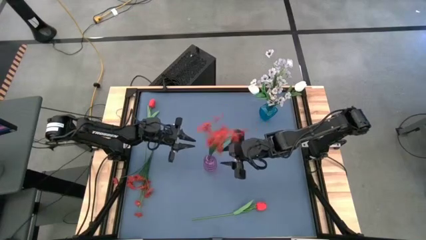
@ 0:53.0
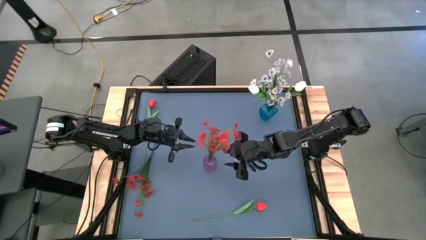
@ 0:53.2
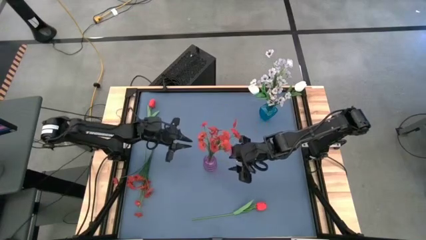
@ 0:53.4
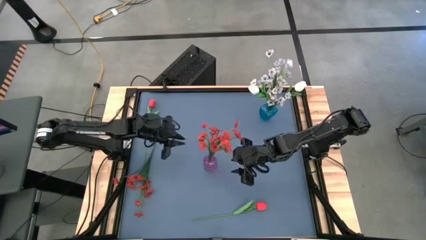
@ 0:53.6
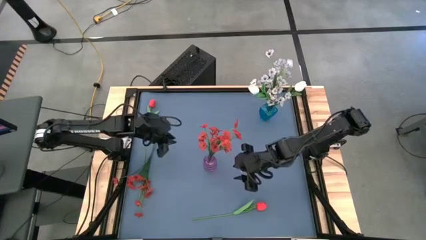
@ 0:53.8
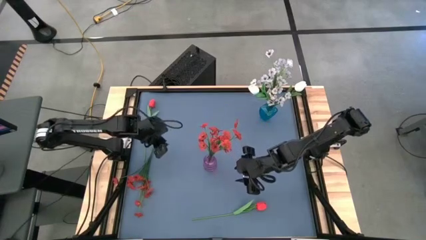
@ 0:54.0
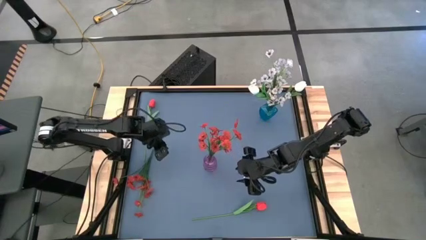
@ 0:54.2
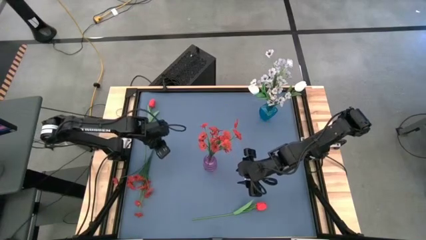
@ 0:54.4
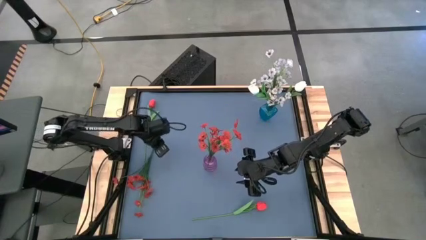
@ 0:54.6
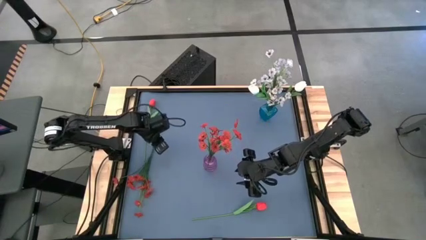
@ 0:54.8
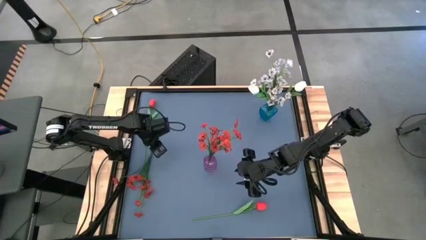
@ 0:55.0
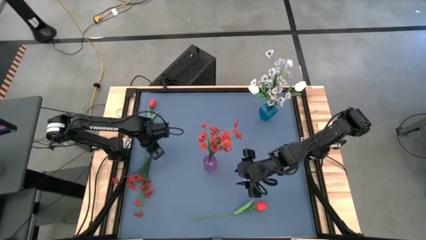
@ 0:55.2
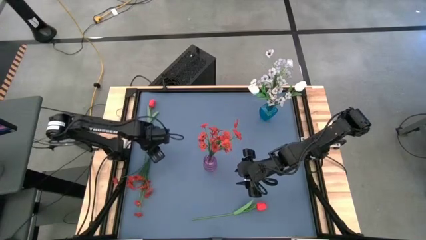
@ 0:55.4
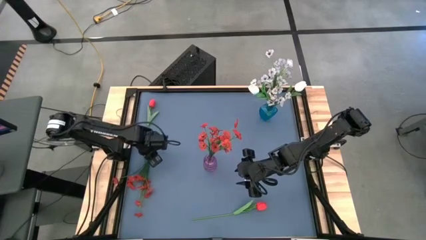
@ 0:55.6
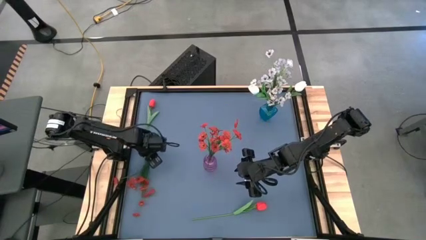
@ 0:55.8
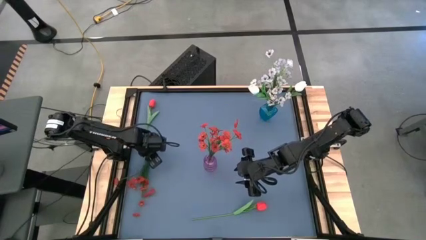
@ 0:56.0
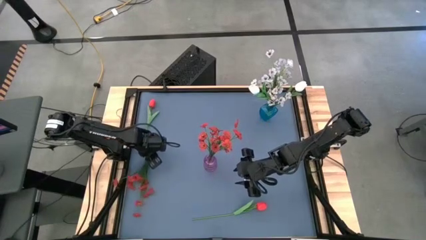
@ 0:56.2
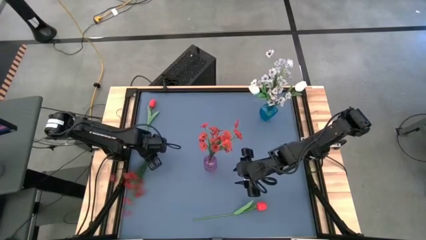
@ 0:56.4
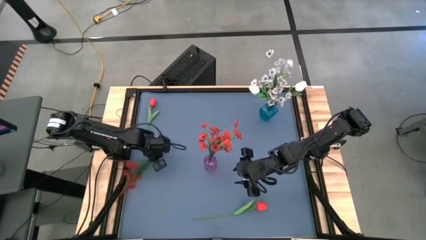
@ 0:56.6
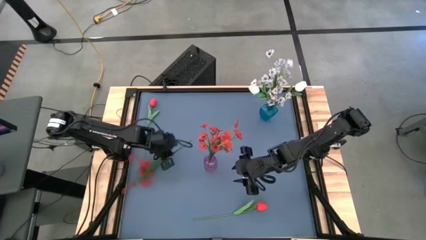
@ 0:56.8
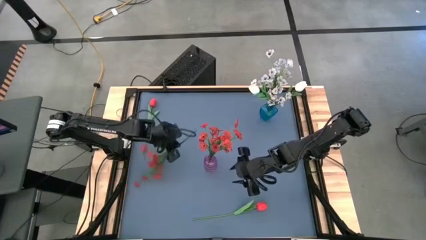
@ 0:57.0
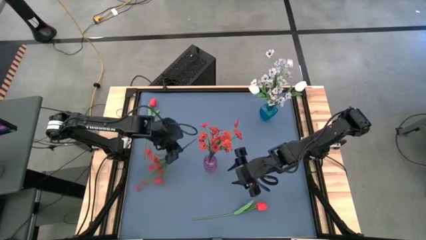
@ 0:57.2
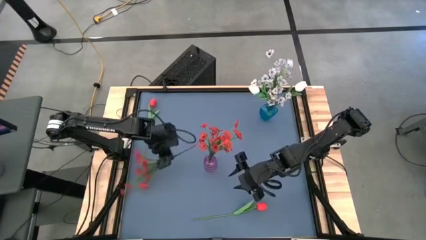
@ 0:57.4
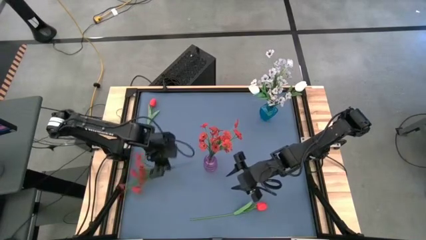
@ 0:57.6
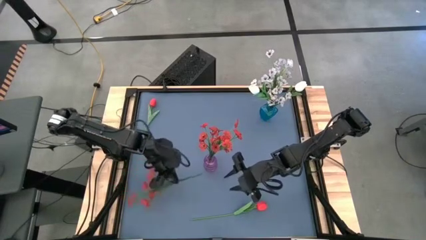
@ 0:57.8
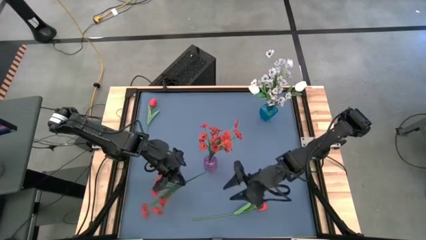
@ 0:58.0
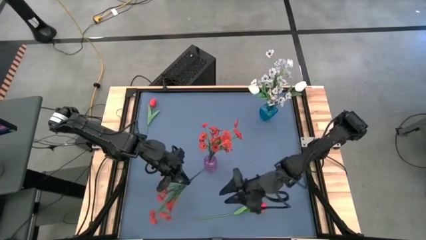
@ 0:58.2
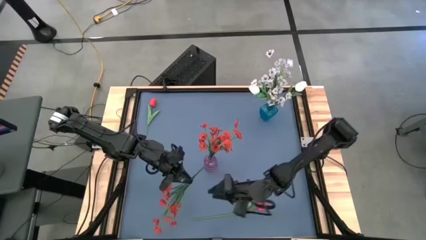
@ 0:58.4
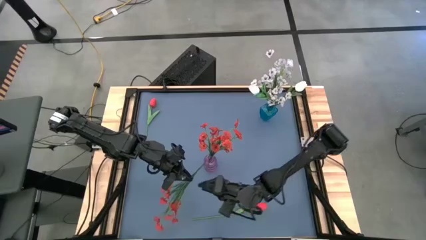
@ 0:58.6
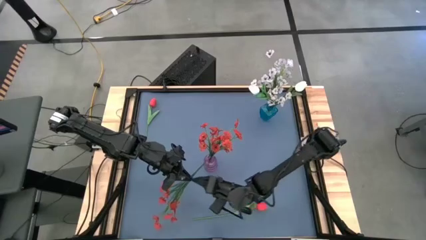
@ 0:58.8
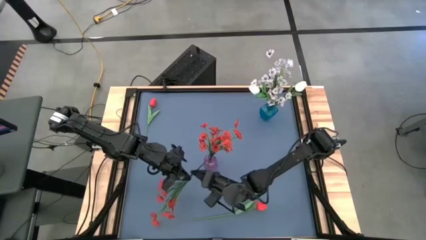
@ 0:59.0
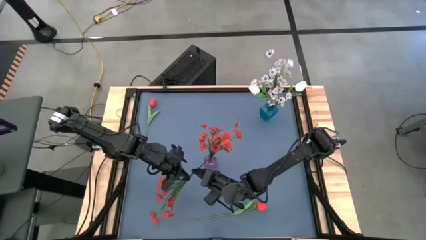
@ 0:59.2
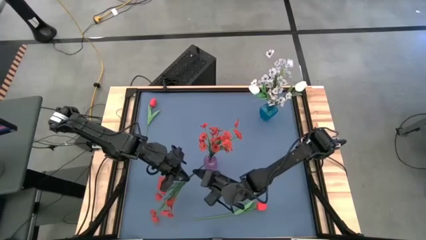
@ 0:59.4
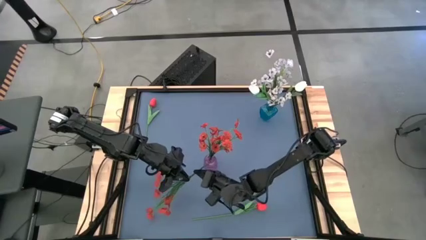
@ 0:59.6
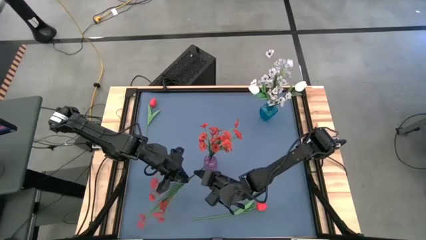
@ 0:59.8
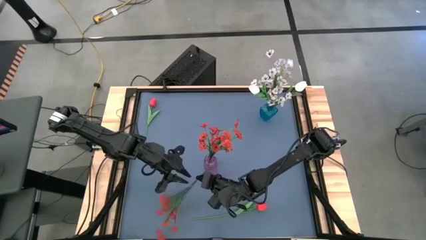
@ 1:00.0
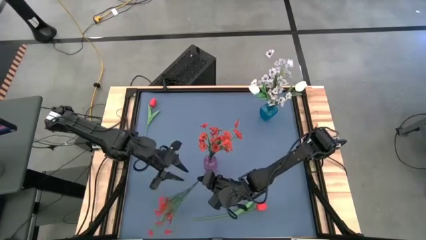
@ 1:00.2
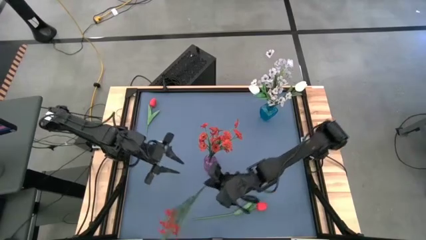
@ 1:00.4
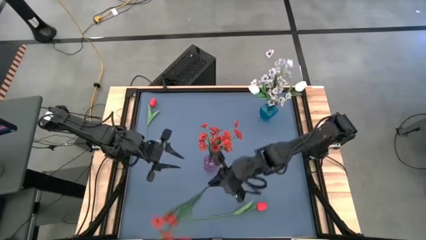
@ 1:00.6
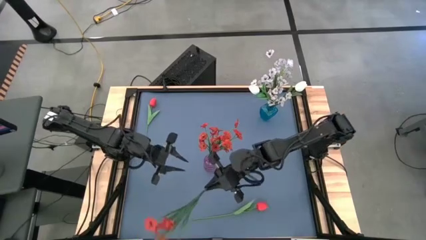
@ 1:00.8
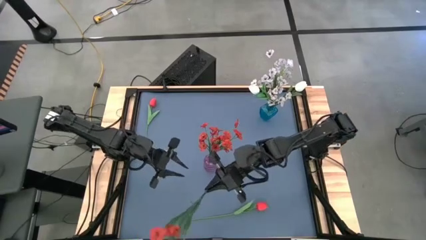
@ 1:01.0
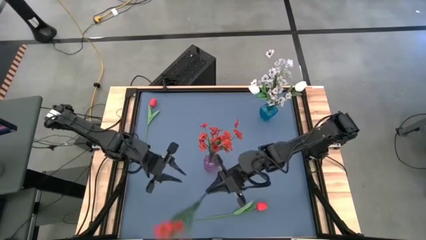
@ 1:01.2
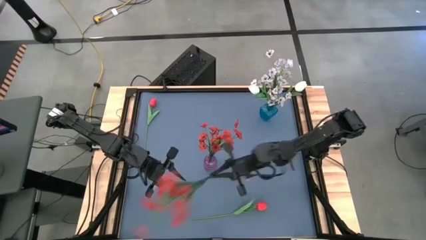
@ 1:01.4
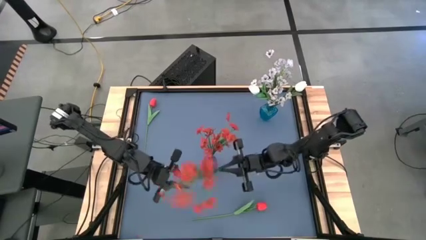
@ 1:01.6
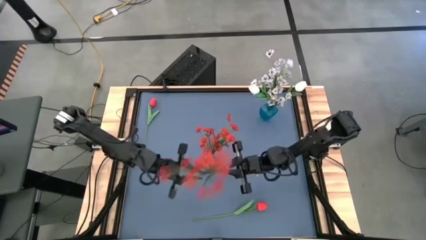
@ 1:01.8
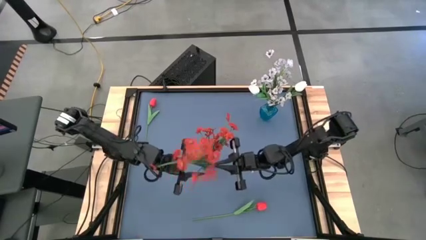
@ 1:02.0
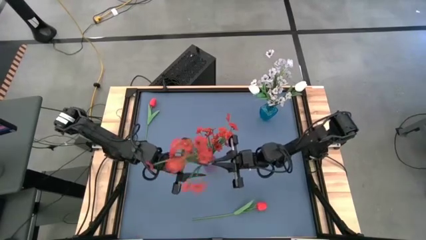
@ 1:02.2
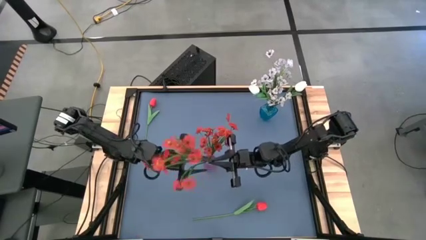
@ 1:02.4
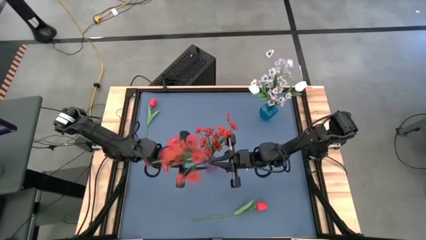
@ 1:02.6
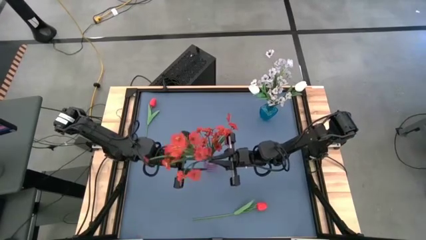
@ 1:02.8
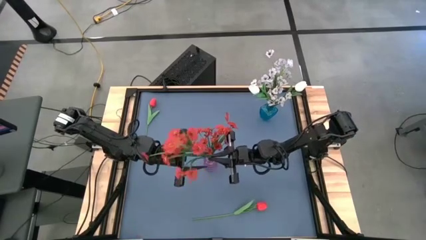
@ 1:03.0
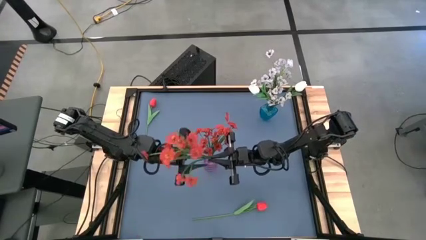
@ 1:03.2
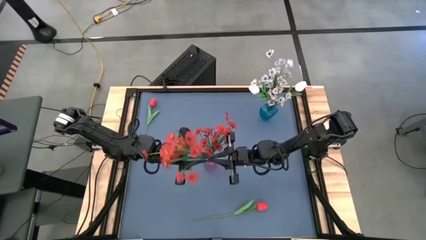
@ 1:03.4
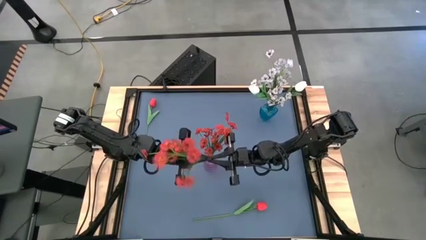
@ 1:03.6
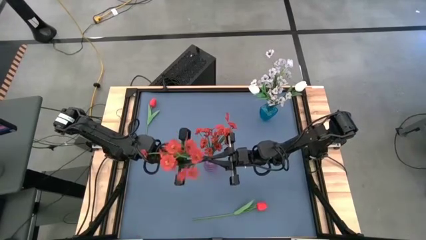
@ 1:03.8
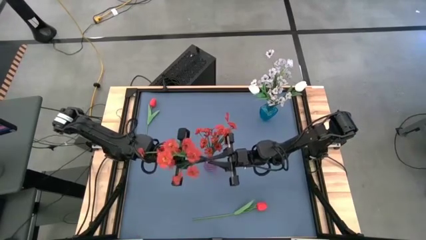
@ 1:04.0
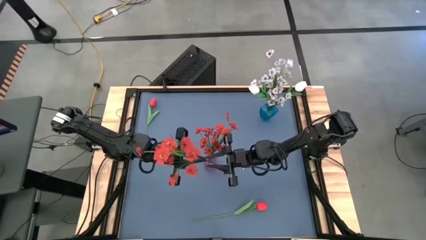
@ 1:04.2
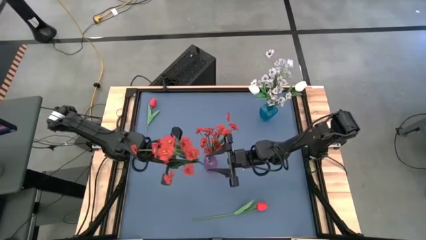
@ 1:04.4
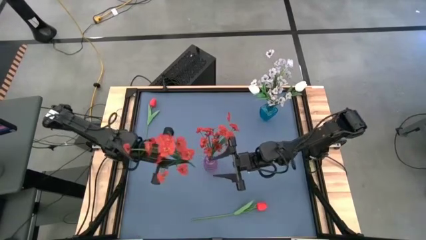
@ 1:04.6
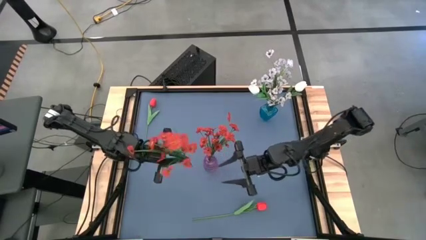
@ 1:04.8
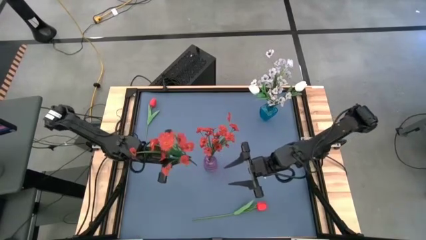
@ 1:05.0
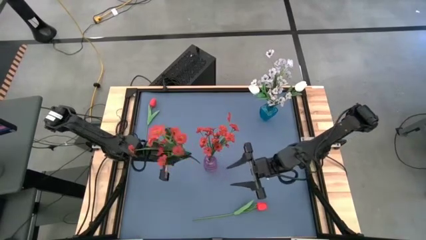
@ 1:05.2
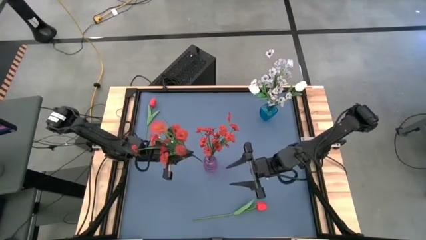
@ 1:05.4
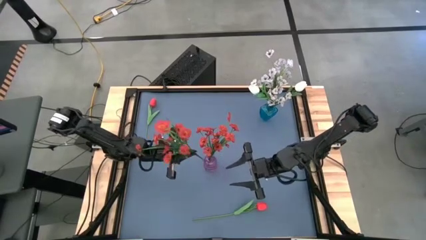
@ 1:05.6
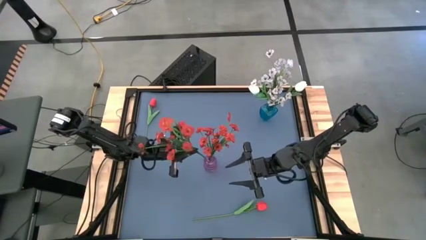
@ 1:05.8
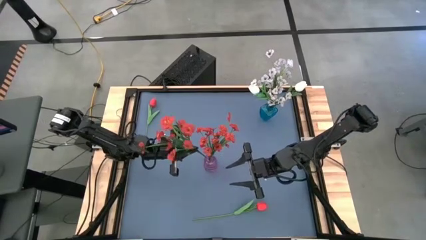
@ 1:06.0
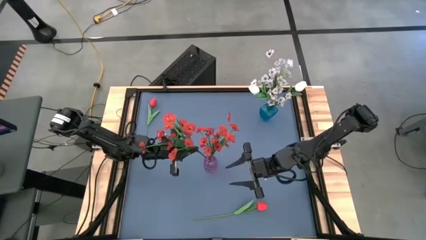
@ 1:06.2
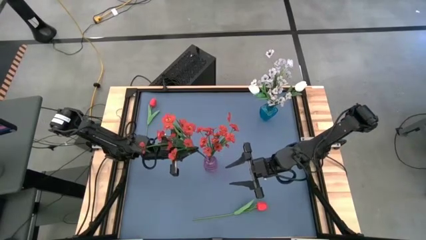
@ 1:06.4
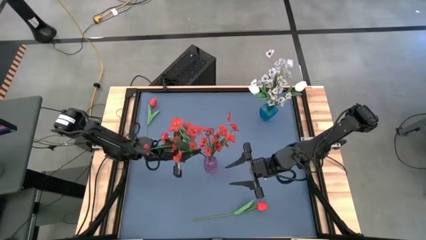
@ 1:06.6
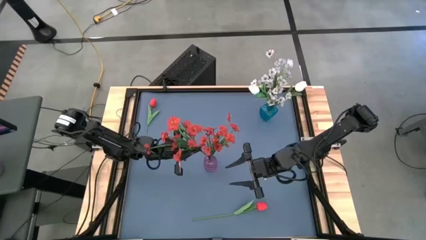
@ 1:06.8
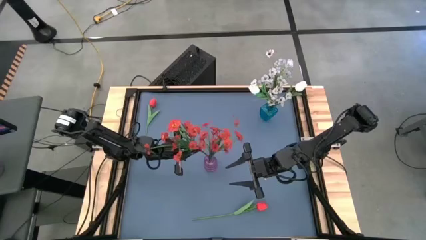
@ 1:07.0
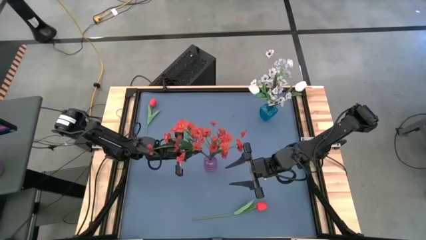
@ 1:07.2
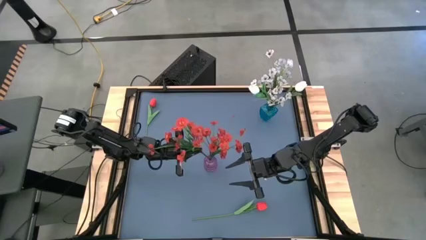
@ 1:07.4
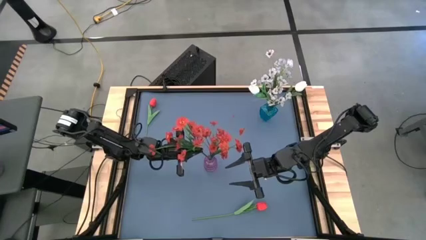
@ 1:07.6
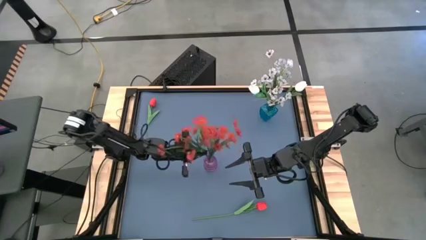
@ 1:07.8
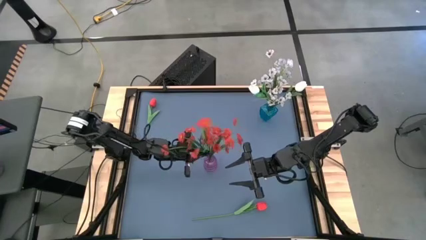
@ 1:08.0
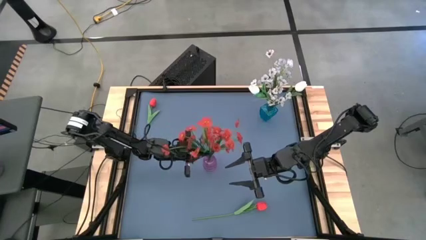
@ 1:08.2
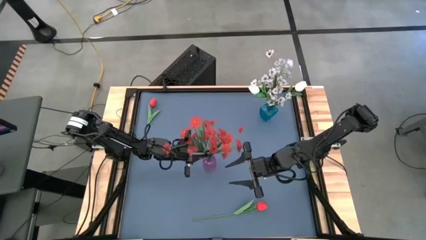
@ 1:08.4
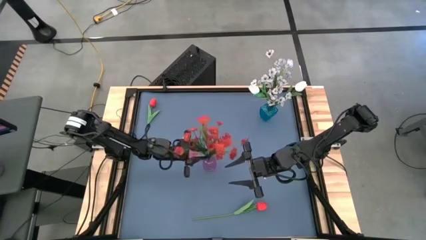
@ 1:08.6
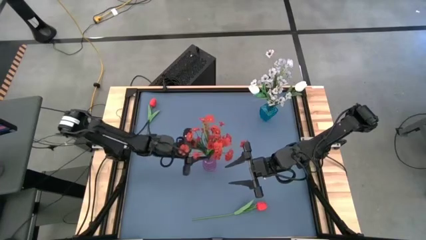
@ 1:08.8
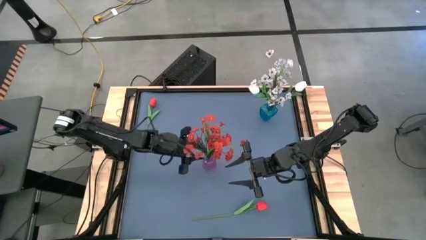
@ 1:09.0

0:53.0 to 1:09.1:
Task: Sort flowers into vase by color
Put the red flowers into the purple vase
